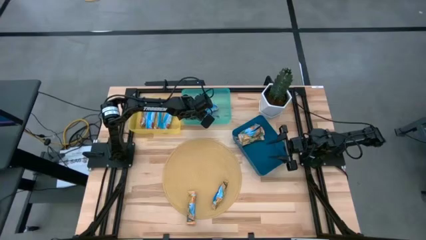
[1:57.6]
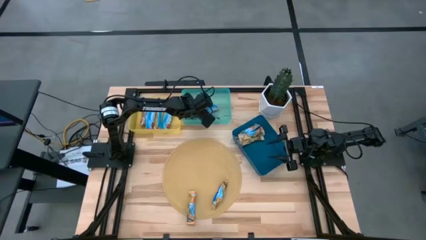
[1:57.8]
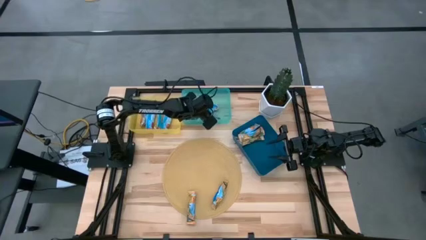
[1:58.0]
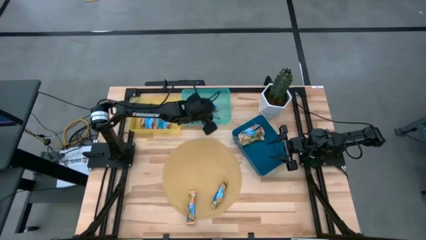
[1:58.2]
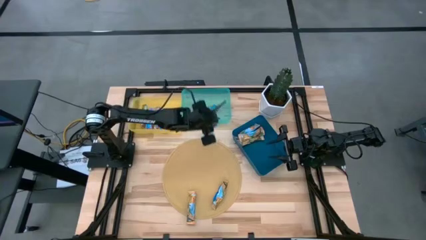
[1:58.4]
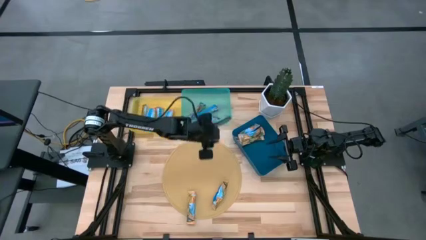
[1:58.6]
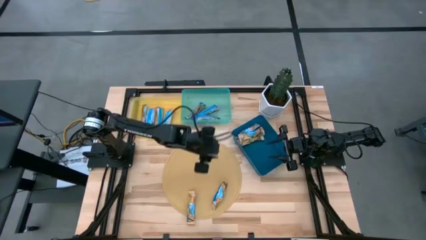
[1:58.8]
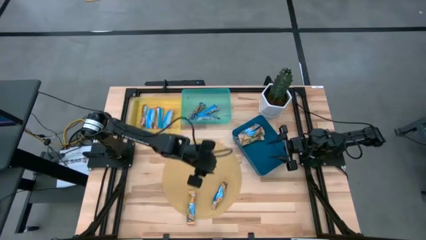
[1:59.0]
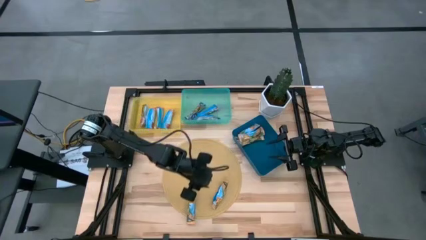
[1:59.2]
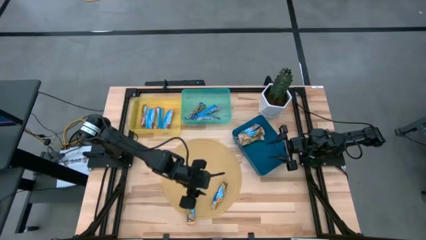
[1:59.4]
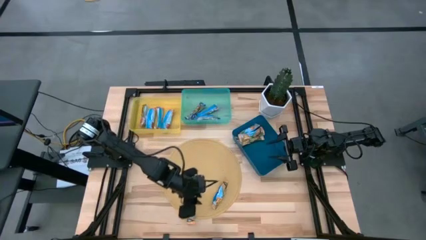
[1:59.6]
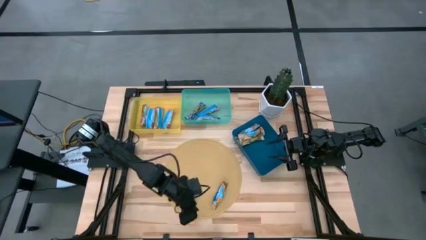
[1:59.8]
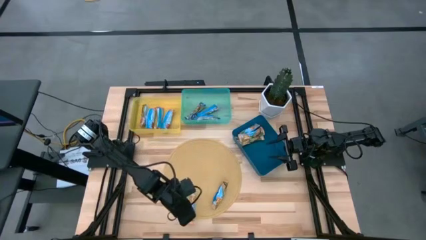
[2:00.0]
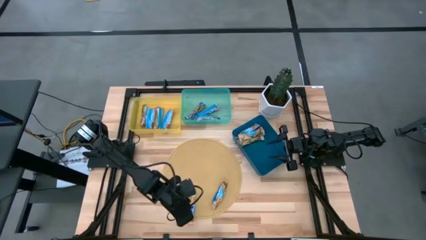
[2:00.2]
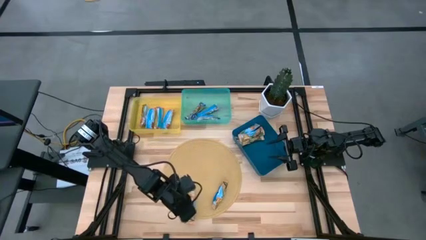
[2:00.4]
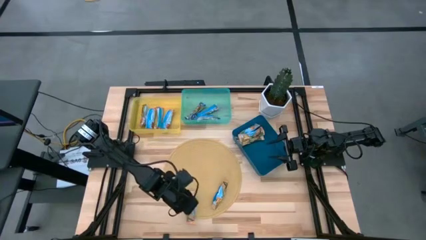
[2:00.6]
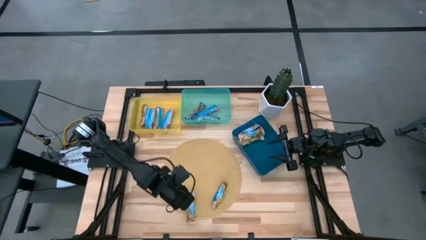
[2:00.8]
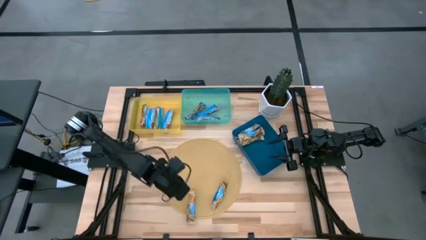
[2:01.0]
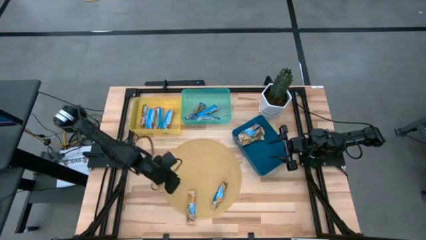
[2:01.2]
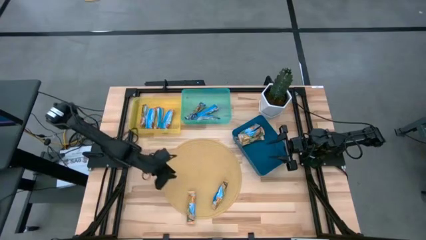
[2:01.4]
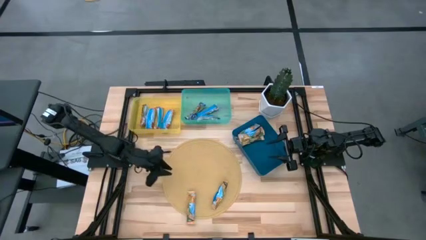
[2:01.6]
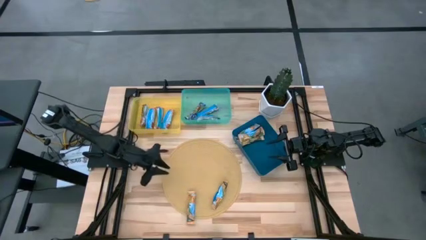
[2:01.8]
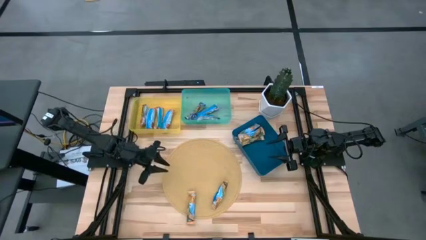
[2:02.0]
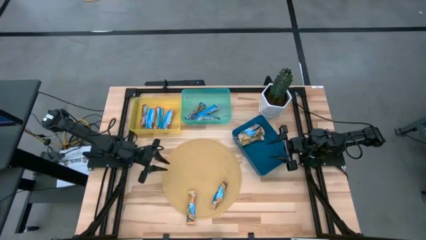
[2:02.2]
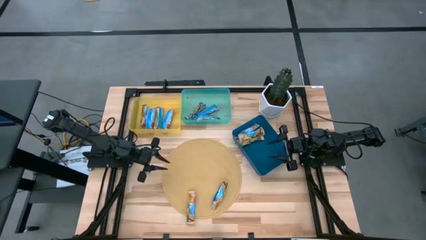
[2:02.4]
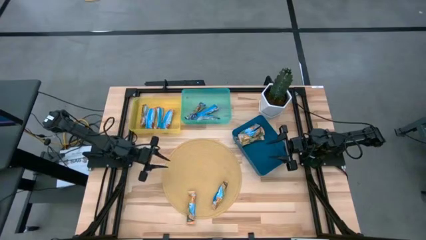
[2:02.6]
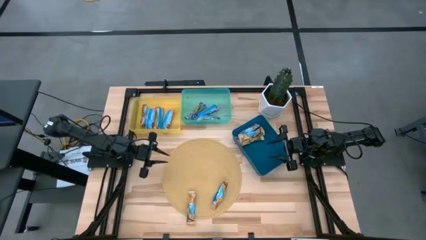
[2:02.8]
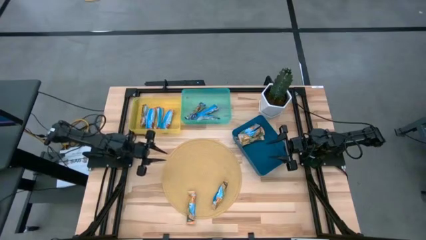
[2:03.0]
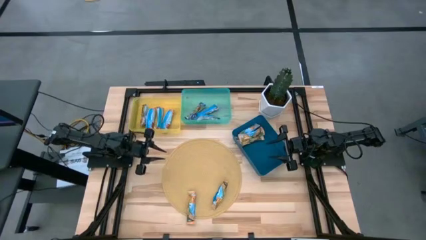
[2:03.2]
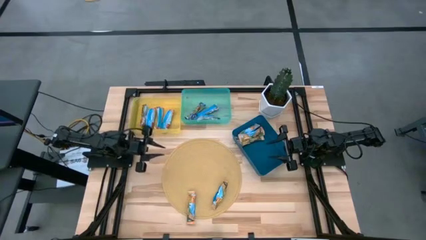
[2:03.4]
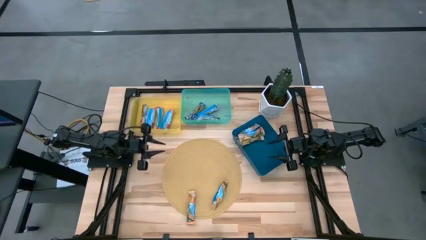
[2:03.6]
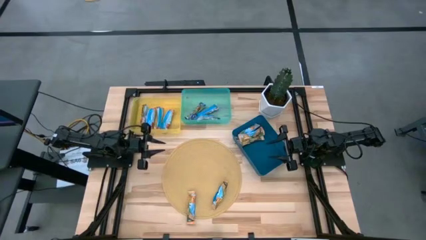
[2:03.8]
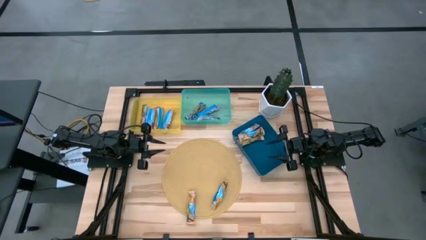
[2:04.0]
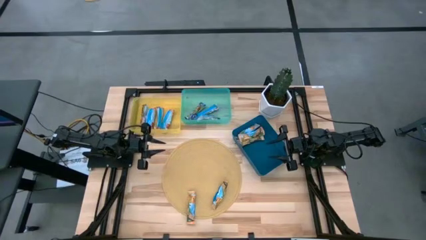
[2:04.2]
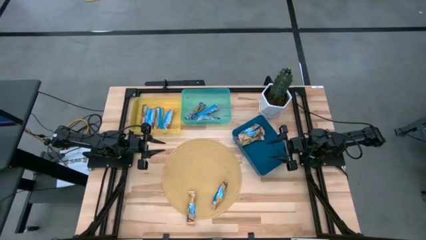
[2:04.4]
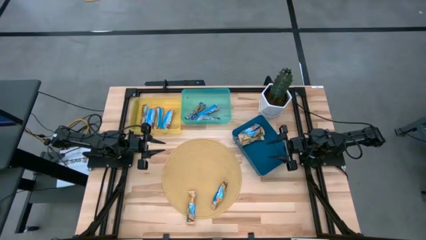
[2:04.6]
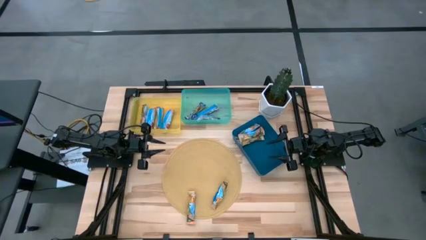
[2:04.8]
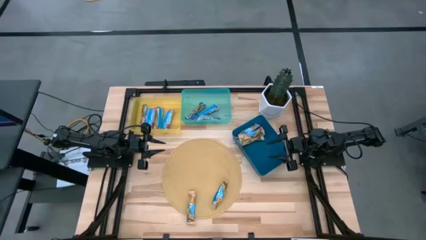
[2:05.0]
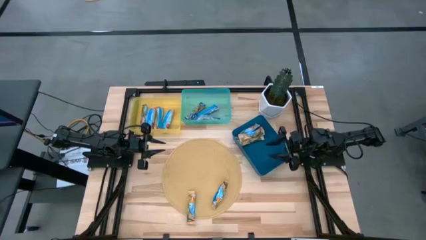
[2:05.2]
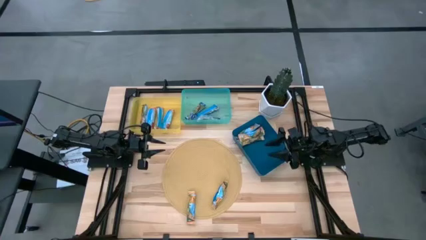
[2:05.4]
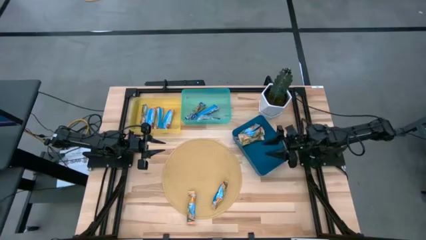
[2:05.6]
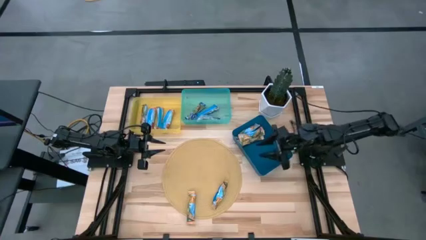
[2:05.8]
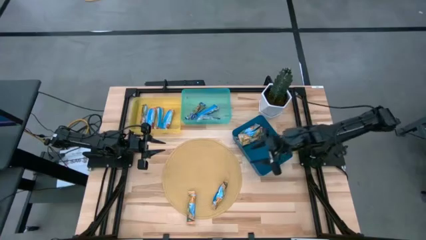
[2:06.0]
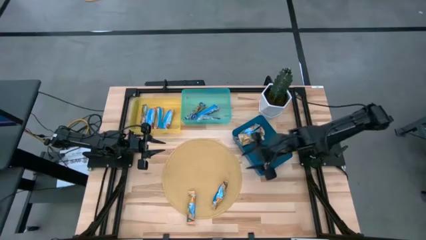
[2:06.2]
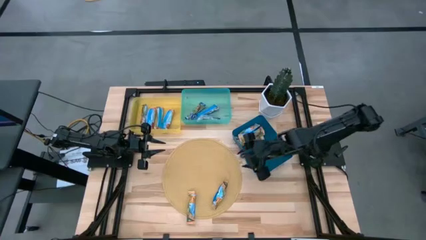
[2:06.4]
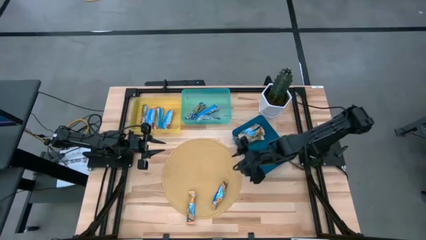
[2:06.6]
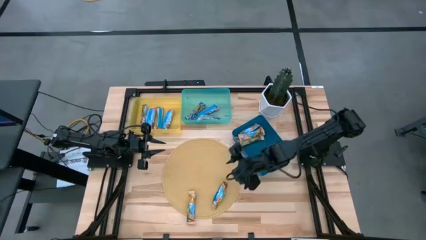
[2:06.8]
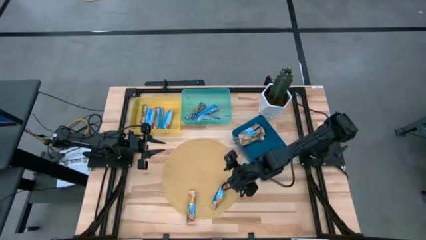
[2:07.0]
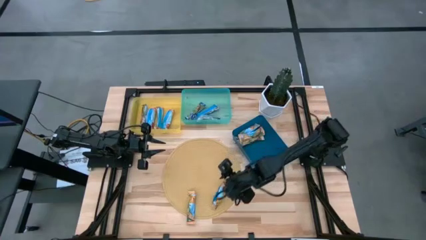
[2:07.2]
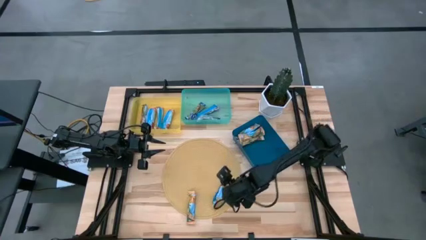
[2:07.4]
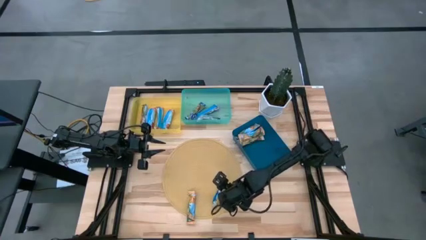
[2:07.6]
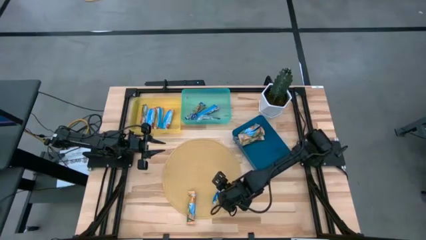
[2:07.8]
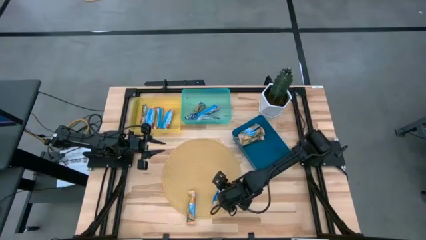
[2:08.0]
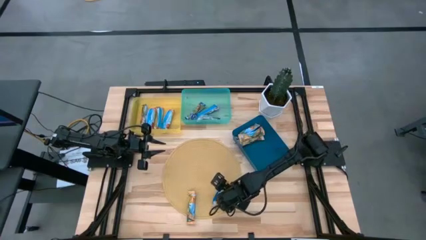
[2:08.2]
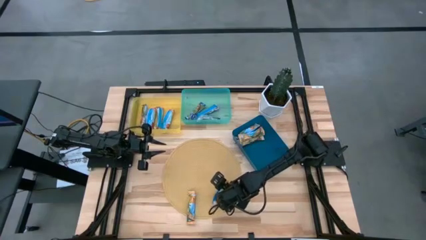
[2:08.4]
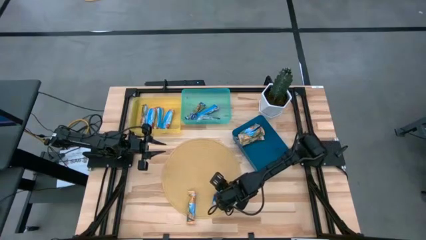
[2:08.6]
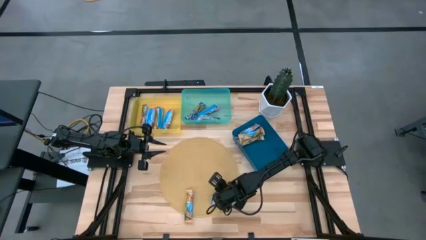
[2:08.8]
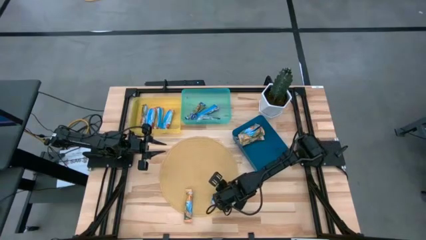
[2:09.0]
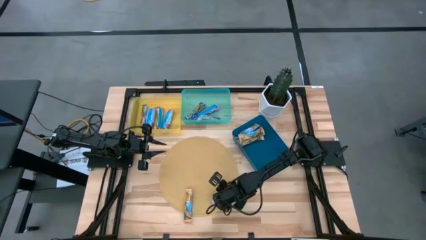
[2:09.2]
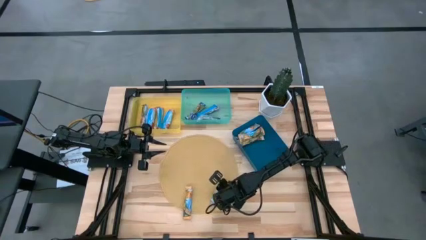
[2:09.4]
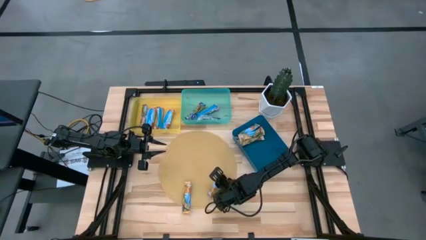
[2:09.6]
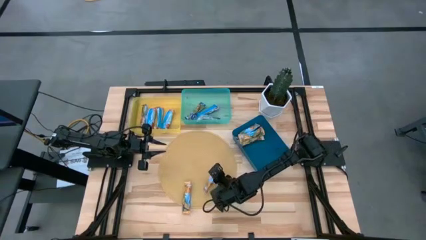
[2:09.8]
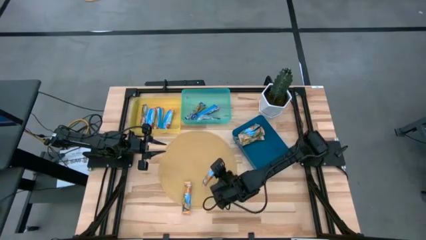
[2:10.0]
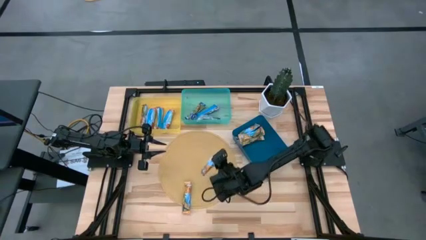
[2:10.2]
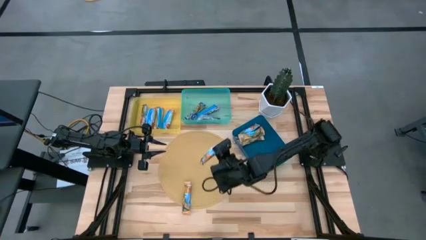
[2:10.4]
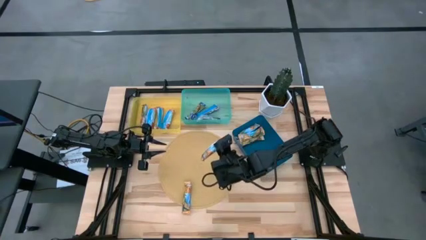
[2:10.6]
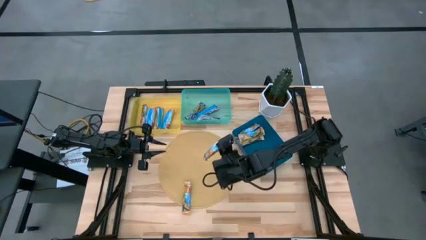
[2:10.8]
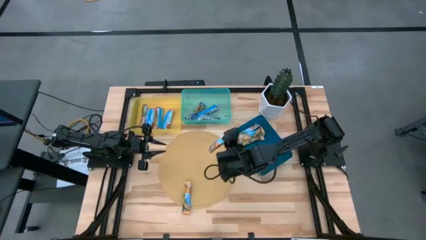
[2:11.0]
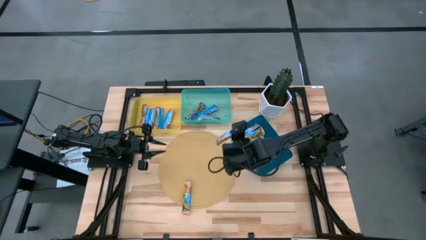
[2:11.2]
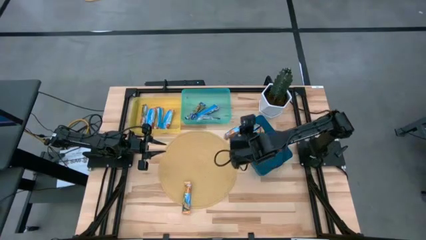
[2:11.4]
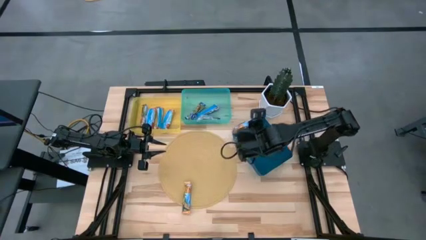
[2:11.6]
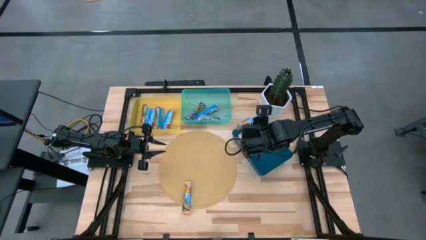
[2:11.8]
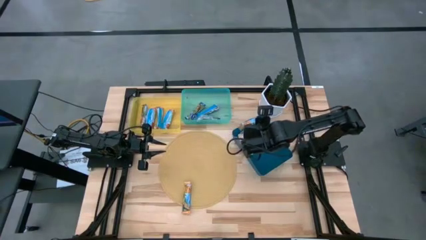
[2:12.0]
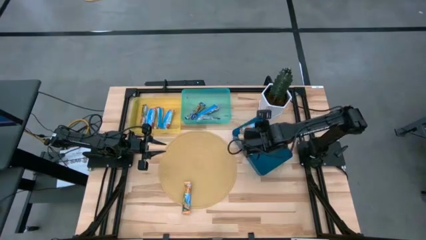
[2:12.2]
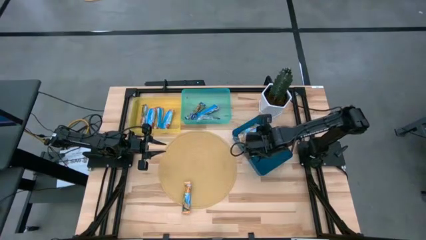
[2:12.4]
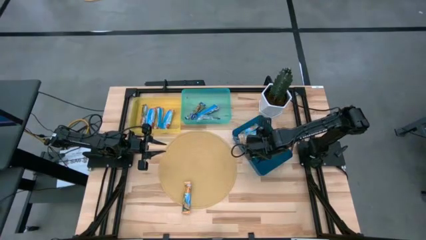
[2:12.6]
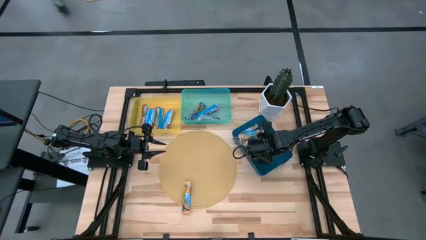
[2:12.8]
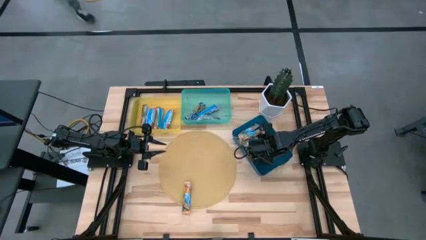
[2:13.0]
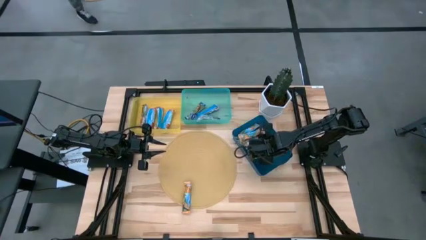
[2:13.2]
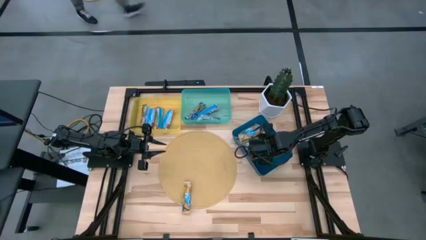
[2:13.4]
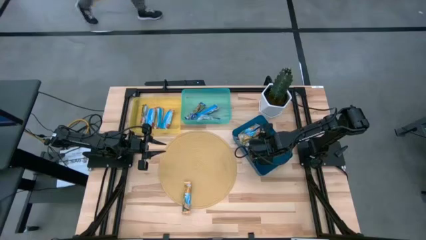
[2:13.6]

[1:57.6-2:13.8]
Task: Pick and place Granola Bars by type
Put the right yellow granola bar into the blue bin
